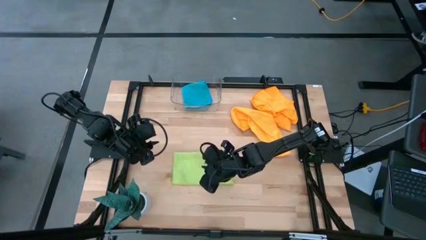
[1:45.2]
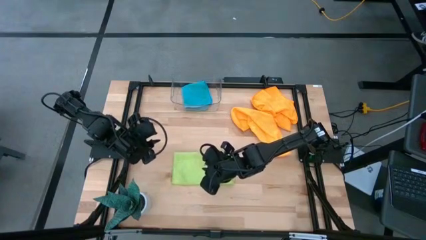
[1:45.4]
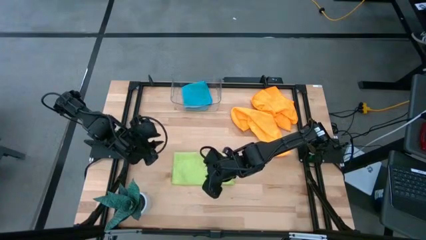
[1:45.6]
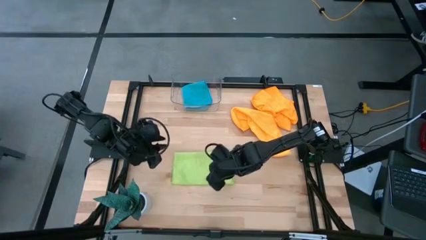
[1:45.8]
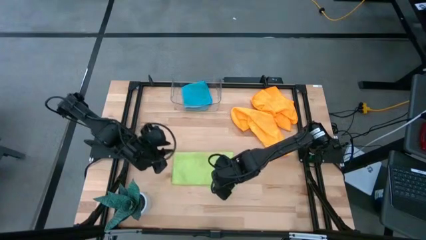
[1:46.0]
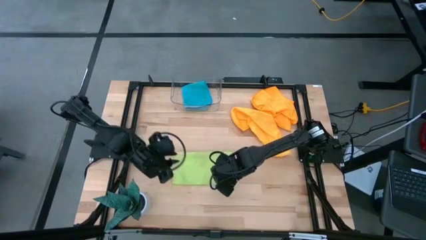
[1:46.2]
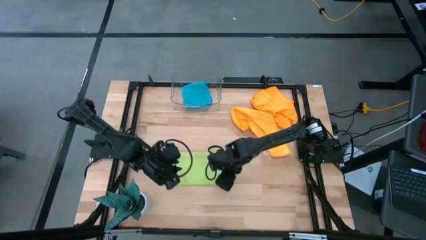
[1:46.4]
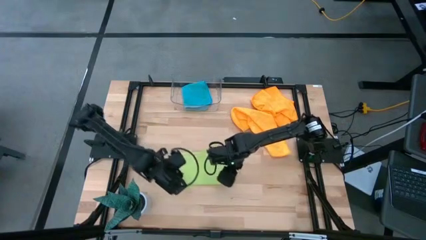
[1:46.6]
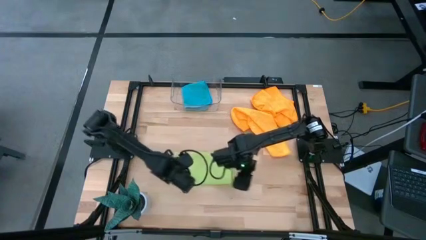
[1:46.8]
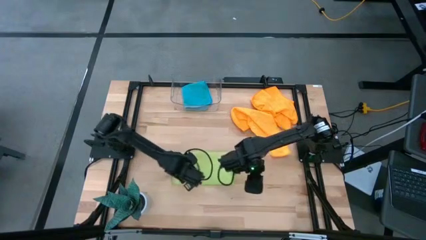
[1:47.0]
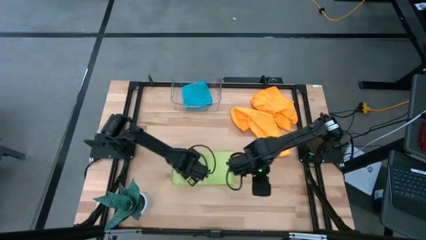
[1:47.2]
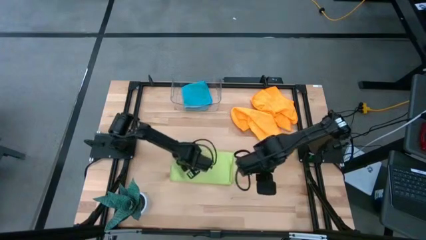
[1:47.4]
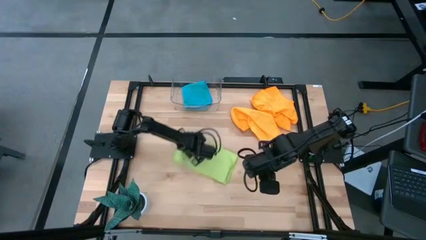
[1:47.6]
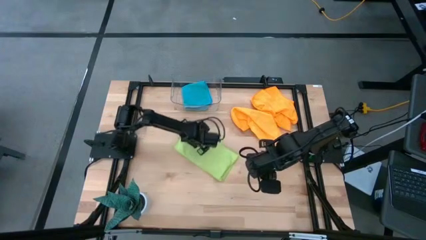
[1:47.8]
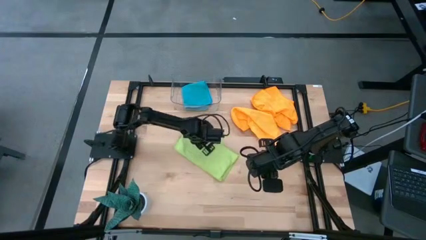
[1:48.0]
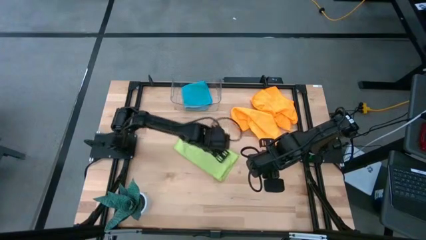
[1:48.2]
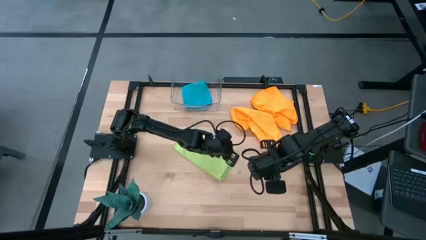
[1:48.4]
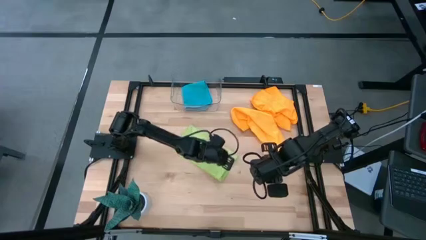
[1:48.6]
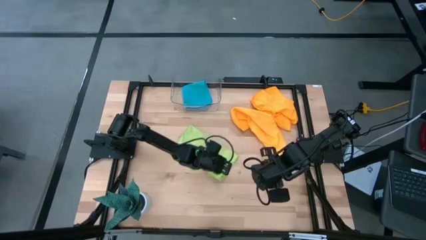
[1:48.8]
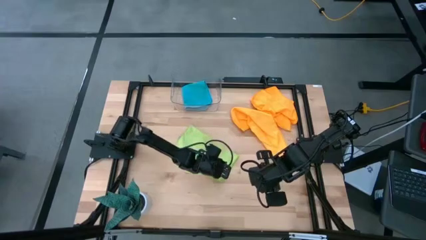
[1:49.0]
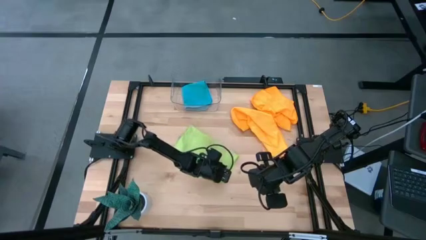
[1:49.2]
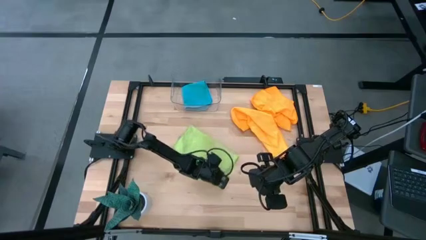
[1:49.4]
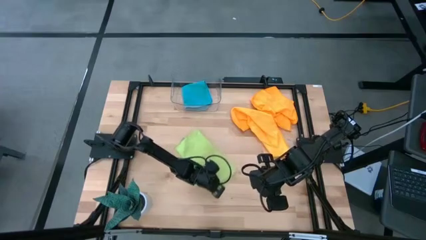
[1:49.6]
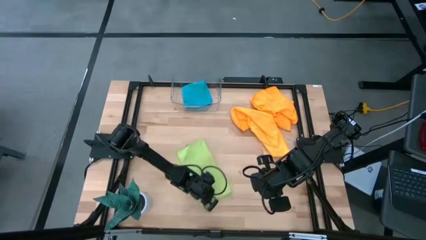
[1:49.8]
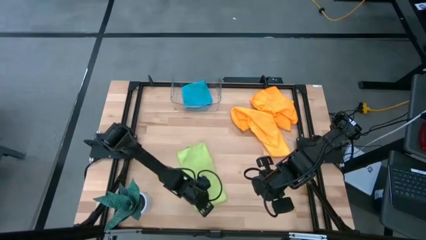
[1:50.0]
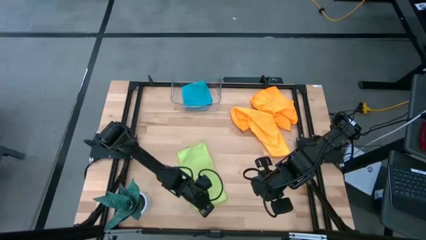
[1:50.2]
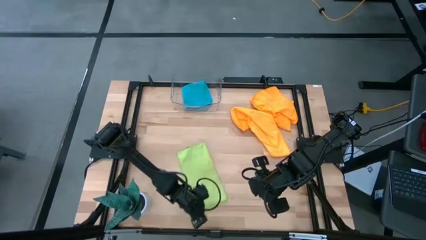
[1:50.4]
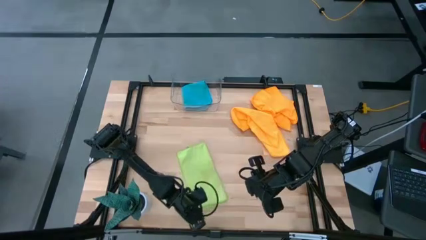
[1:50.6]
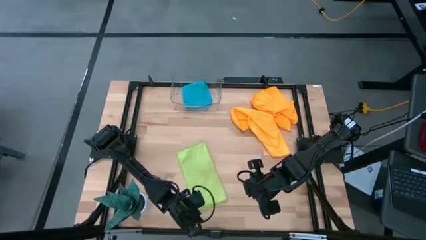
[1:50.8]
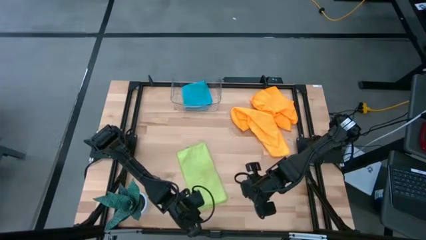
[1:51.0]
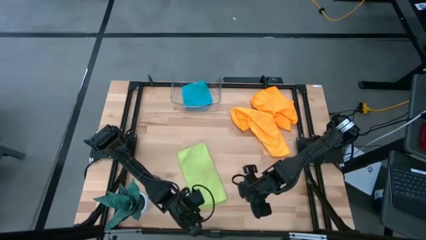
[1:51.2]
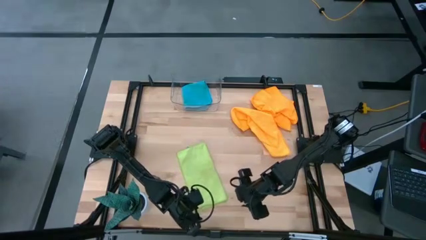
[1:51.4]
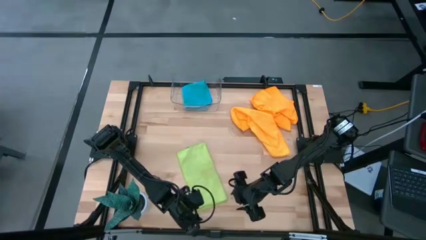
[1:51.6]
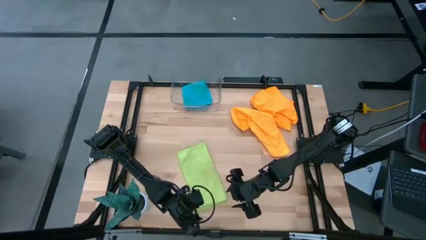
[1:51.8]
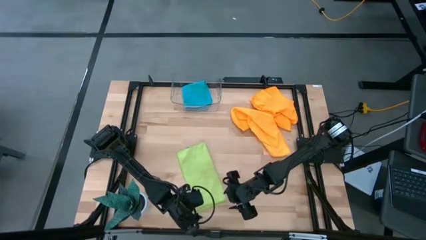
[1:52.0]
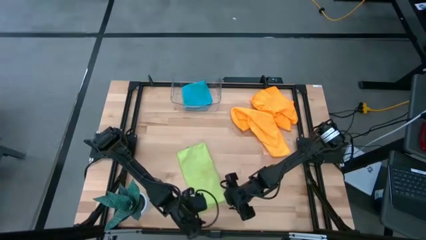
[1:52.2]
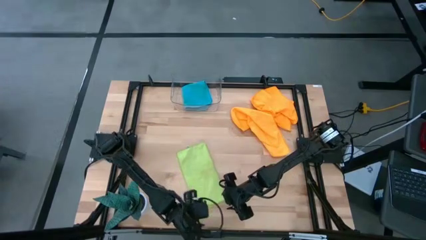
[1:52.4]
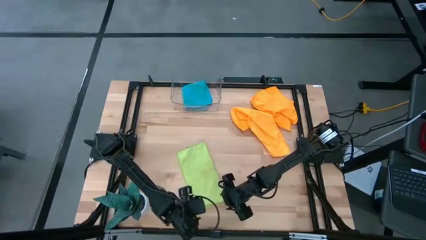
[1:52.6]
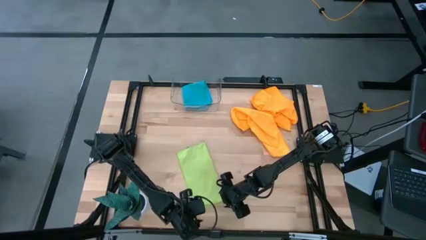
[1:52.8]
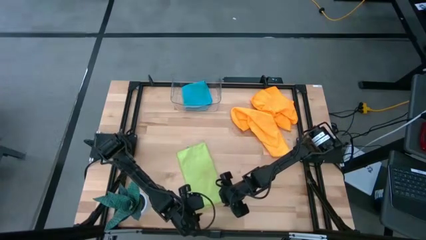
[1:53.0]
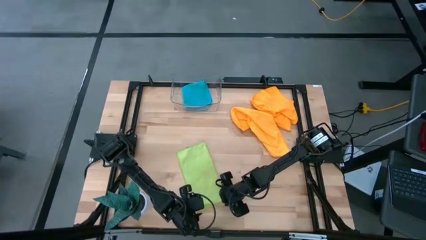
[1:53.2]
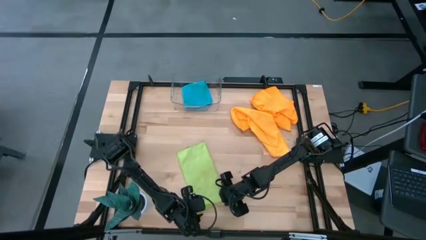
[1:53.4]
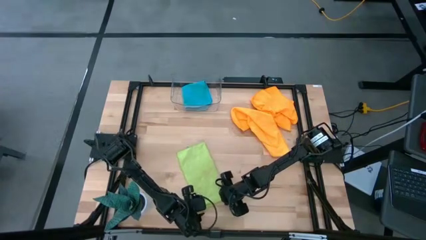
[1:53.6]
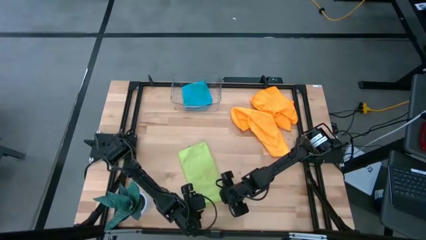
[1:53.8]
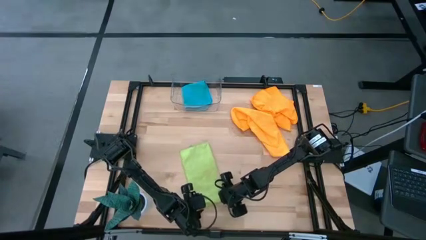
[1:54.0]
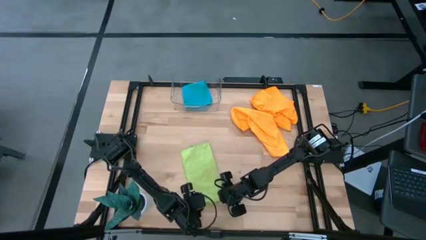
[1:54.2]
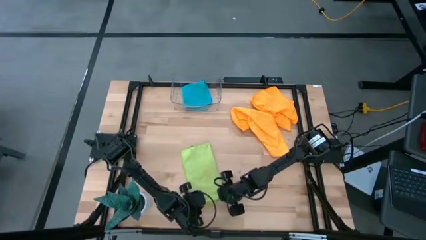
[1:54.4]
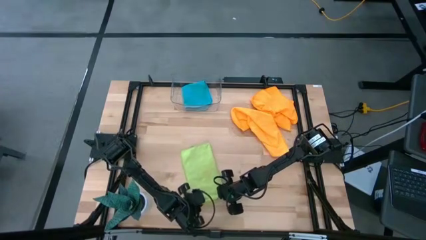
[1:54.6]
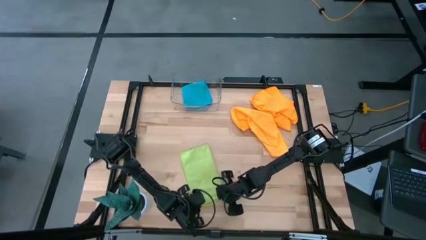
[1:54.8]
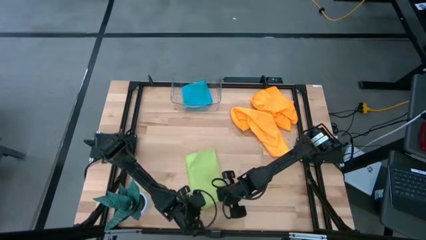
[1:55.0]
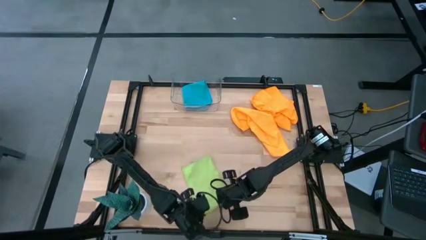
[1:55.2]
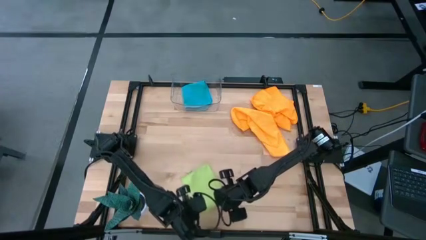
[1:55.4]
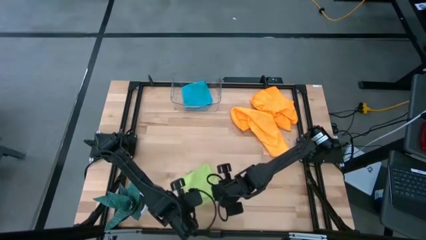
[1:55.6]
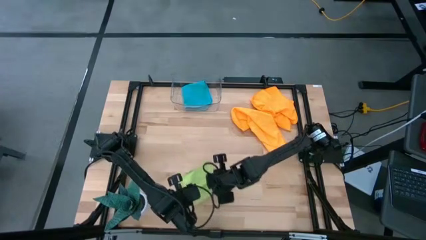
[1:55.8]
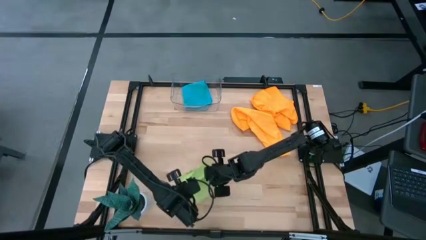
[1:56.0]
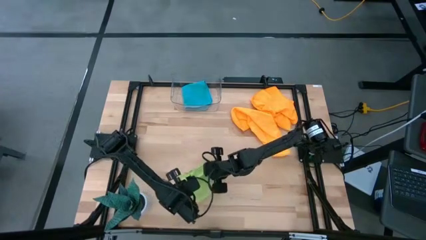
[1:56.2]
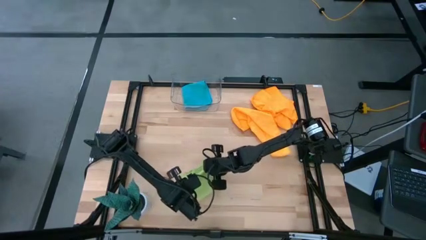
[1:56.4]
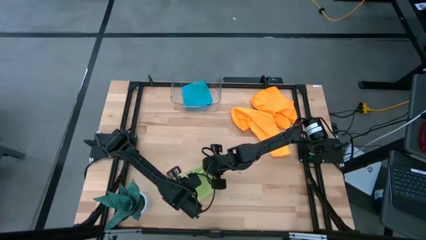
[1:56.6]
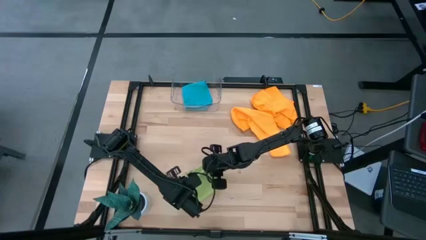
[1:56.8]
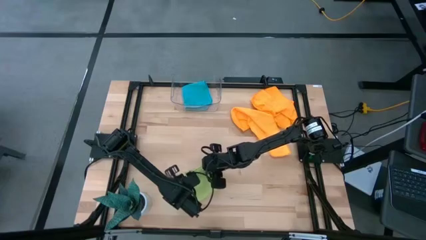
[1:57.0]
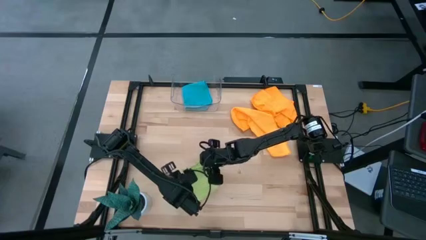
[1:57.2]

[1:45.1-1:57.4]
Task: Fold microfiber towels
Fold the green microfiber towel

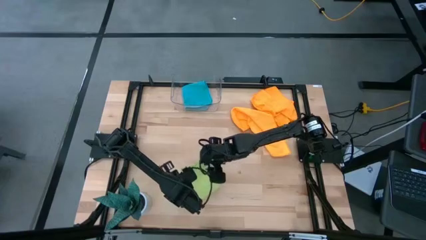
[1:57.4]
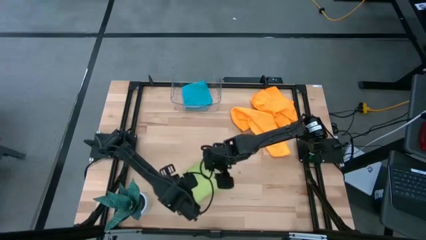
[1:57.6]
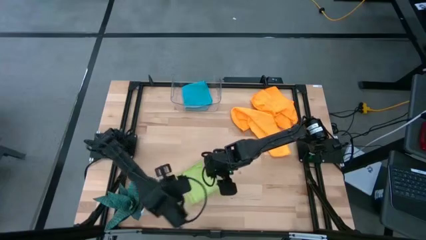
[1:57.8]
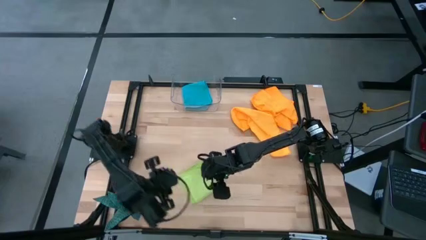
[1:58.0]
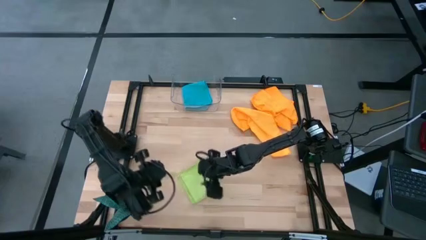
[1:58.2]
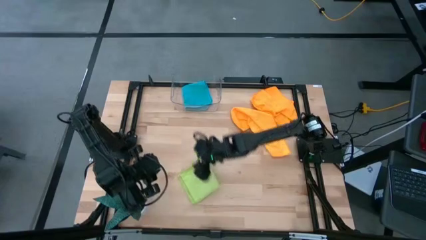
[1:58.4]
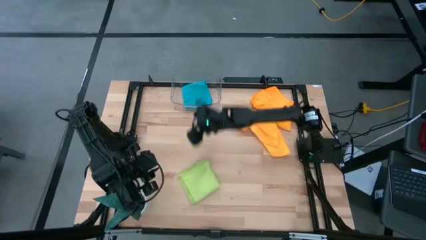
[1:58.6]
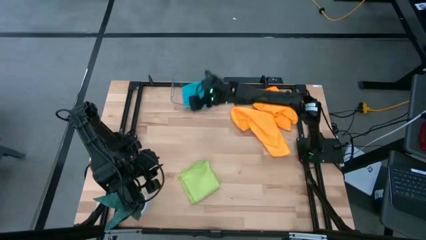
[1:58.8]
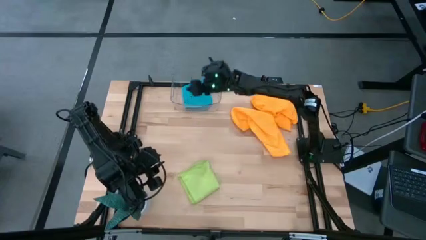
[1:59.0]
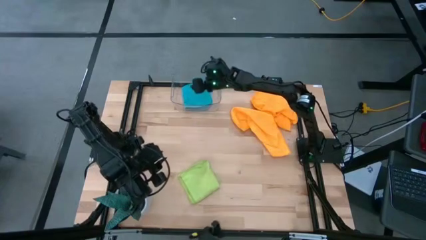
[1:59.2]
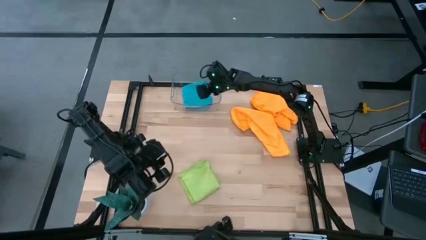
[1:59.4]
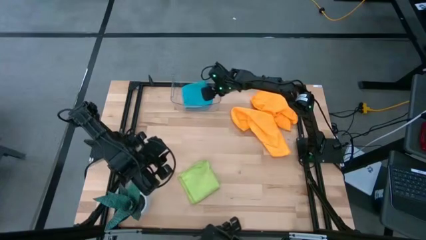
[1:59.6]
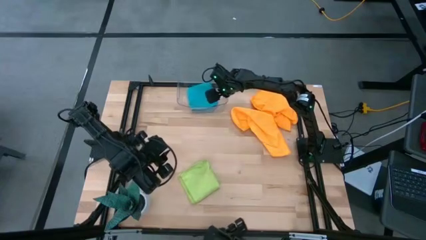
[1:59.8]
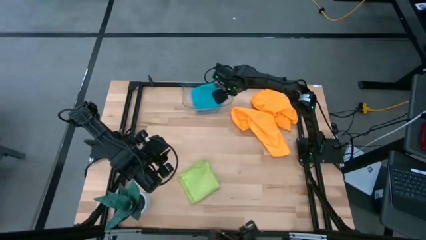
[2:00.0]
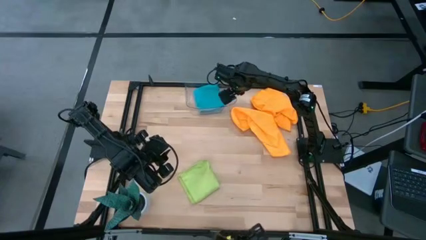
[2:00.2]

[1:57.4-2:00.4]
Adjust the transparent bin on the table

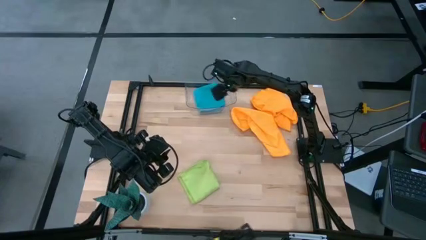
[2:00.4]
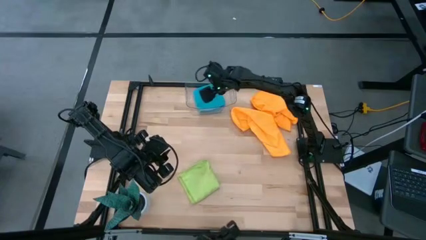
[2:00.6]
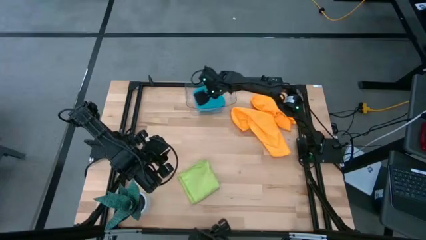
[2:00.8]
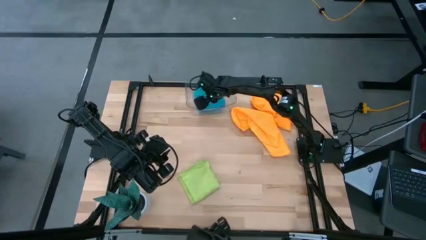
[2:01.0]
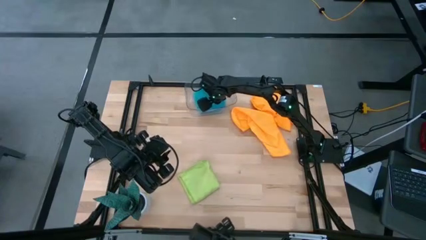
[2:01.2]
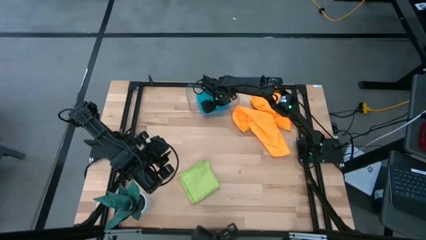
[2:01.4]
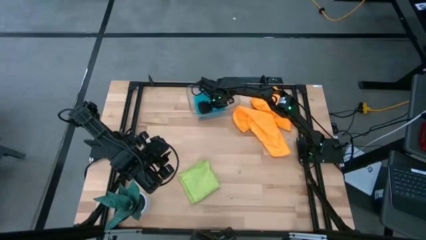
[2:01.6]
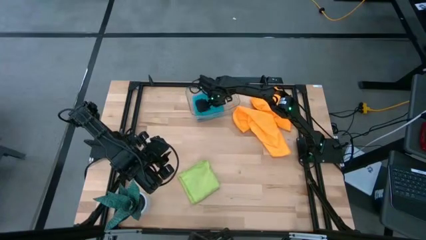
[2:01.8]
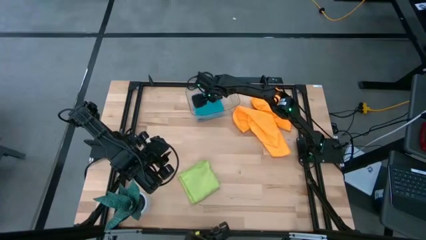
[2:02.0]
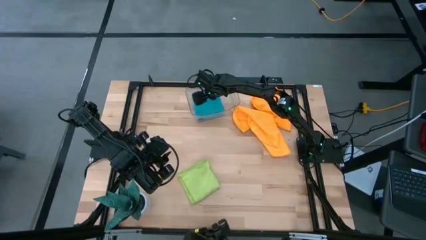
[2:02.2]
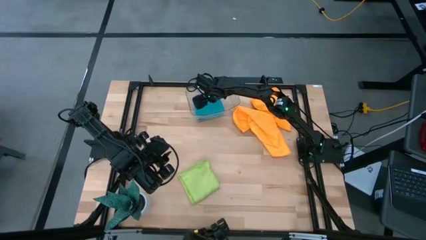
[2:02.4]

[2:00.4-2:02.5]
Adjust the blue microfiber cloth in the transparent bin
